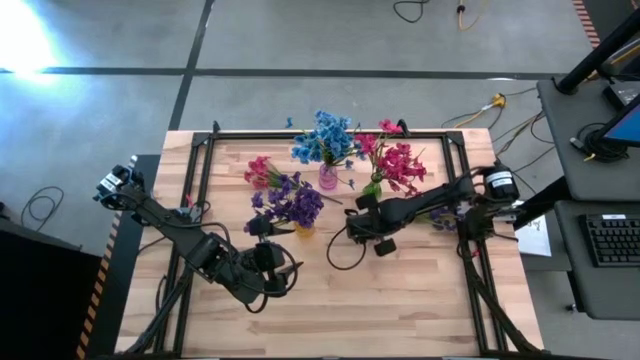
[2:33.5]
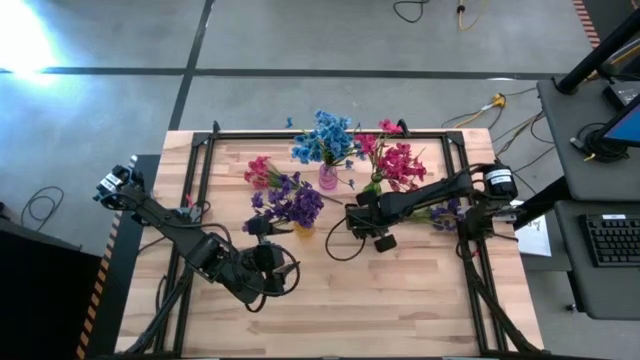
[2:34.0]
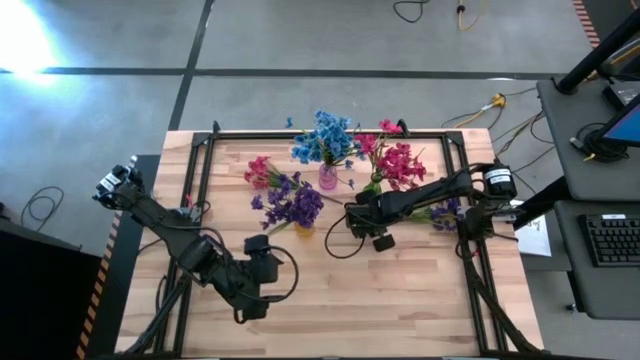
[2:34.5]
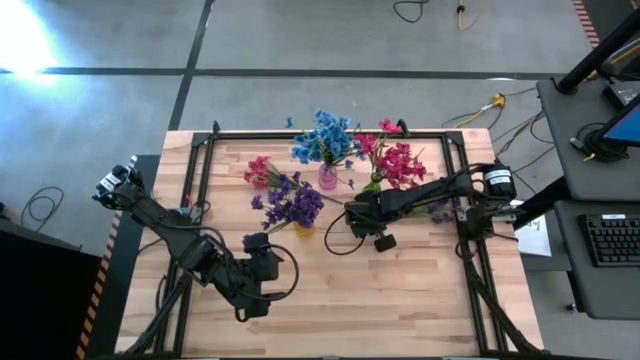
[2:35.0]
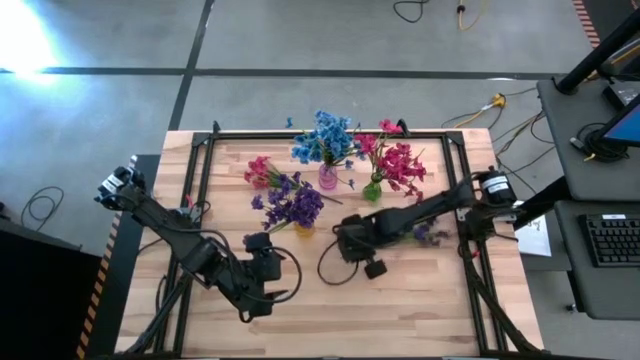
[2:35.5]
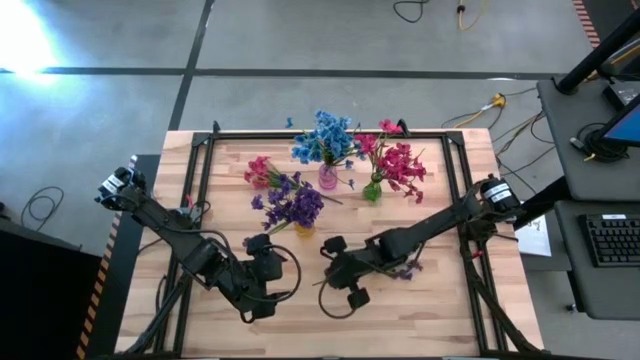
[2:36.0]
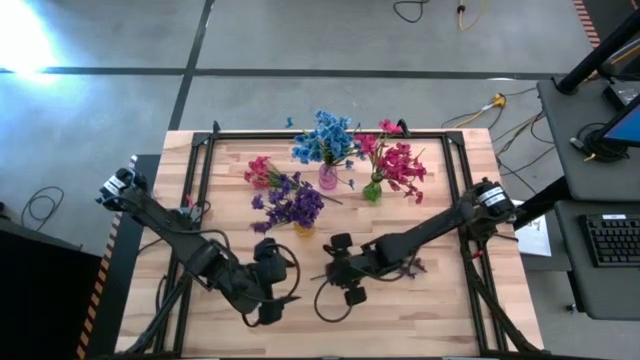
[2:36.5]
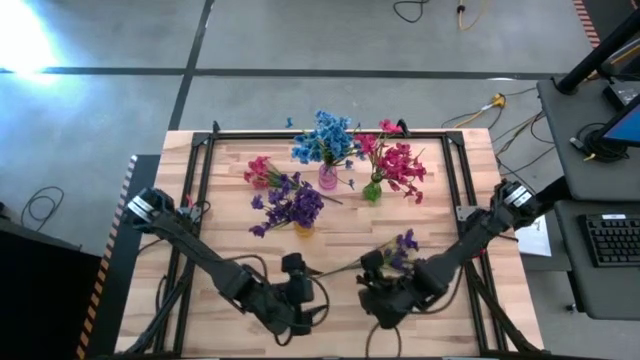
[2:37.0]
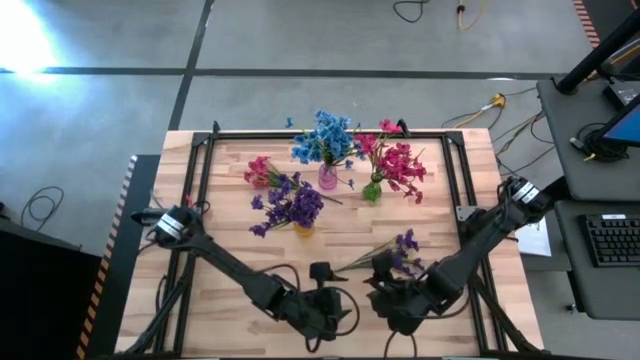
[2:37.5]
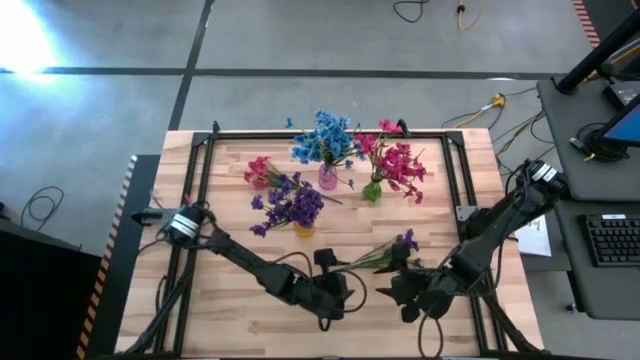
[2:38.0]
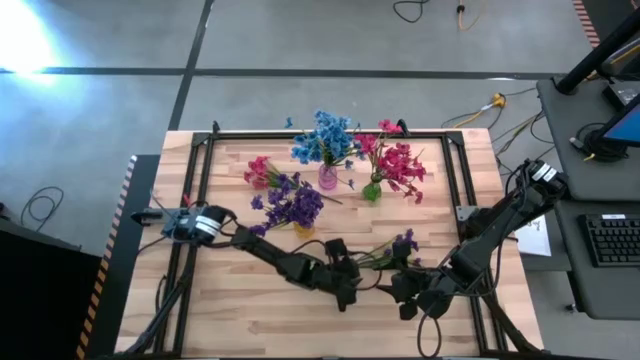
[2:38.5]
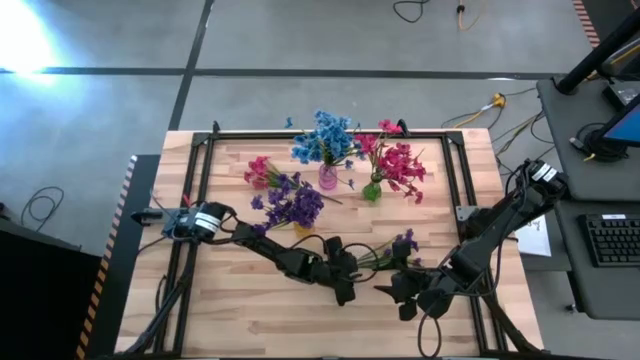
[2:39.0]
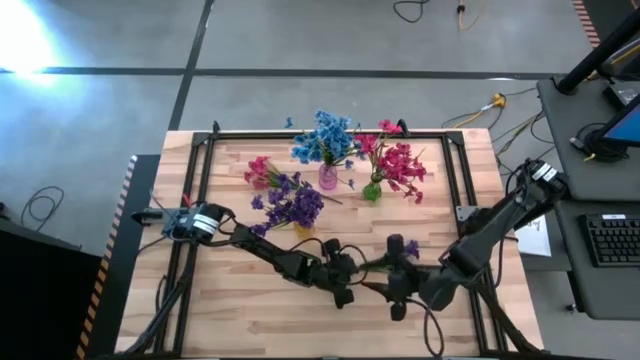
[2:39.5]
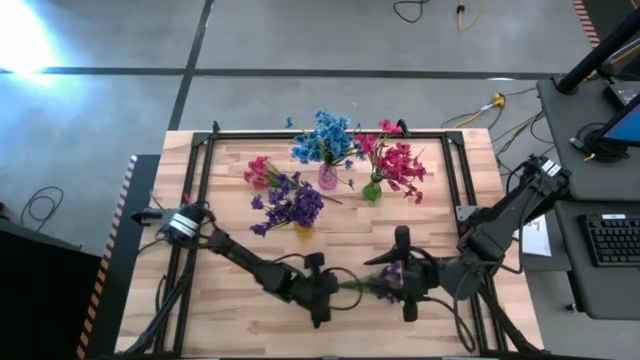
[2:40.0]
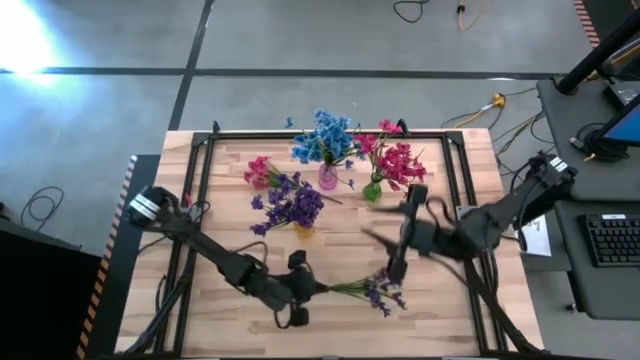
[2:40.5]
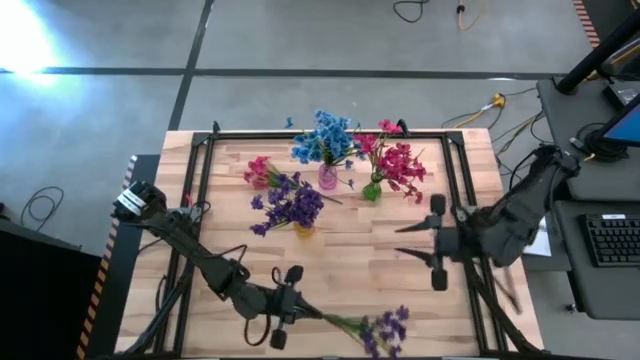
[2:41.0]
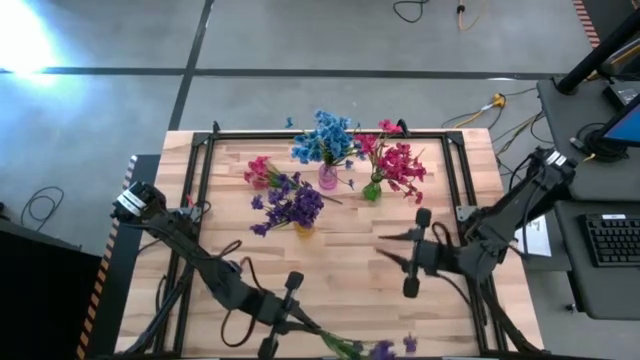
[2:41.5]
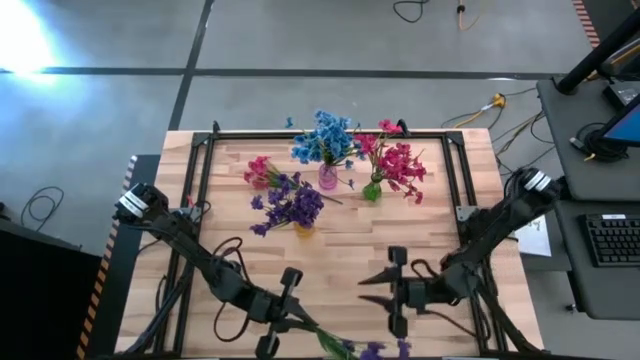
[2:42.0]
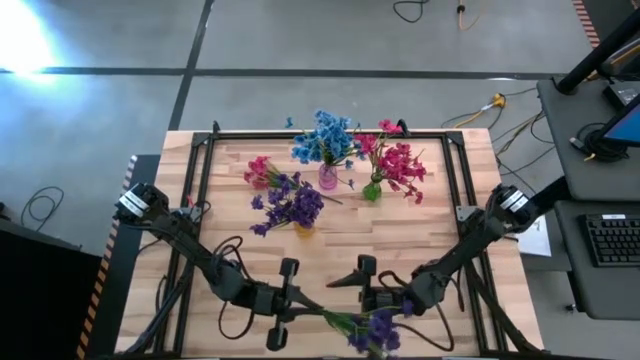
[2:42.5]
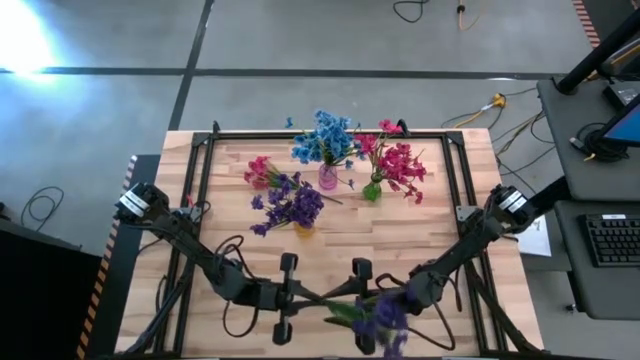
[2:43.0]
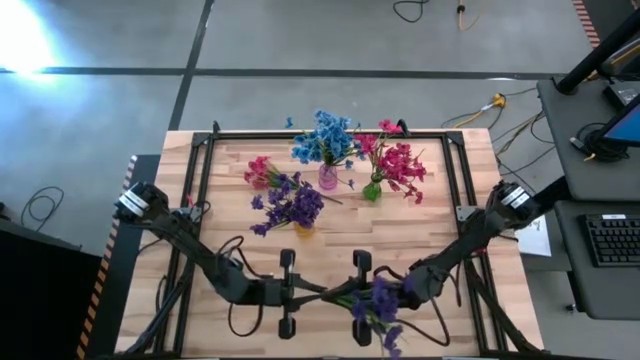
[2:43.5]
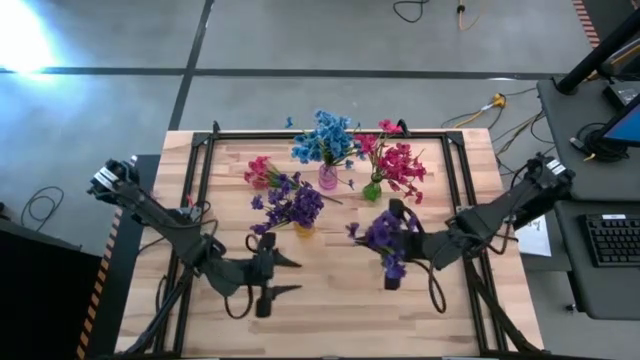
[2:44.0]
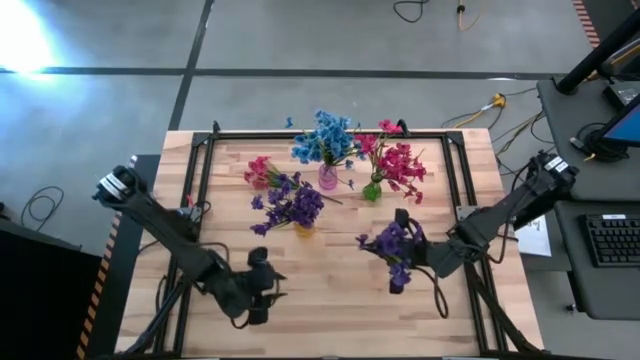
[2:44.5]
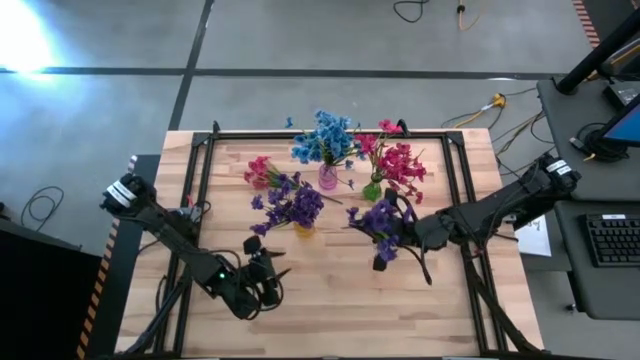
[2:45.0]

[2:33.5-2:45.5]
Task: Sort flowers into vase by color
Put the violet flowers into the yellow vase

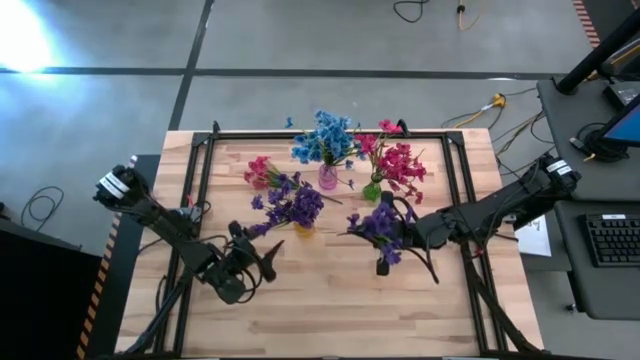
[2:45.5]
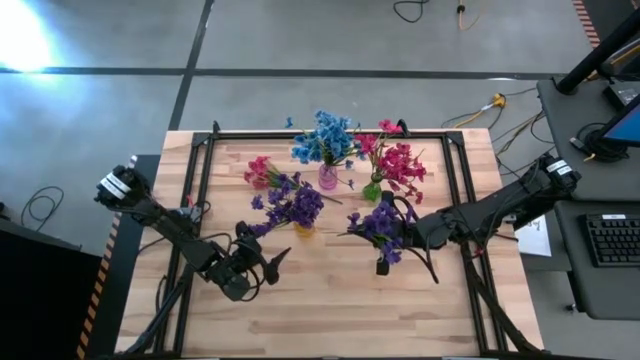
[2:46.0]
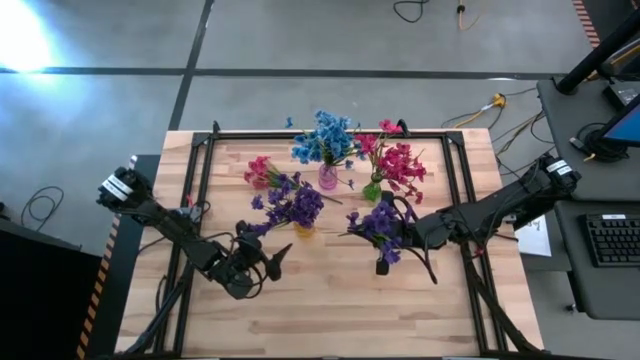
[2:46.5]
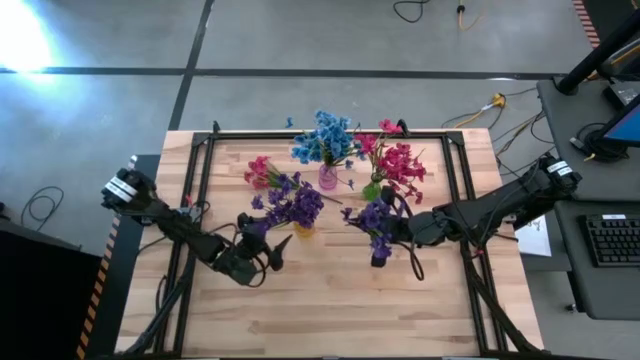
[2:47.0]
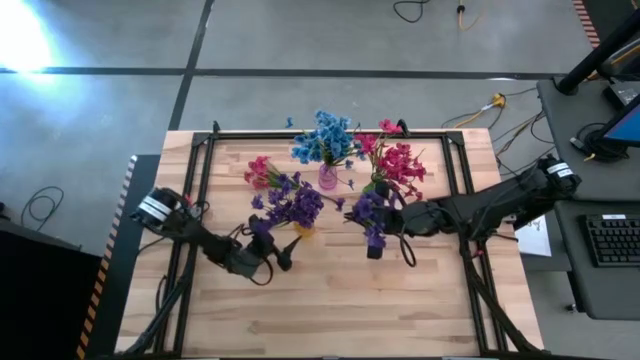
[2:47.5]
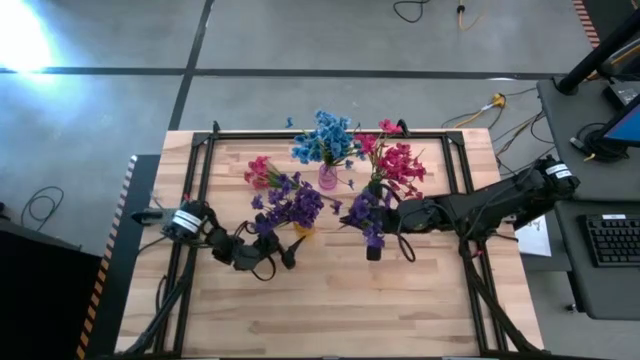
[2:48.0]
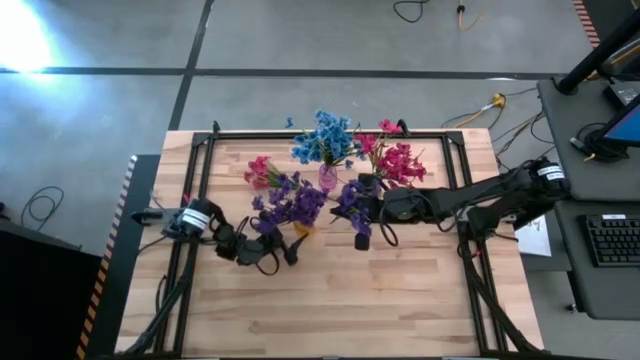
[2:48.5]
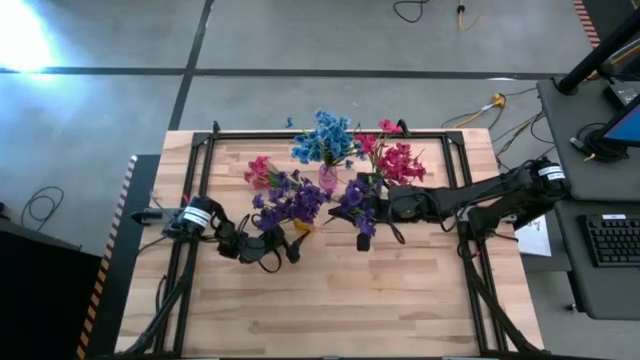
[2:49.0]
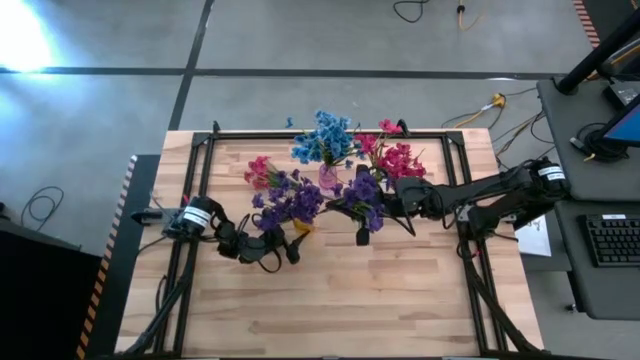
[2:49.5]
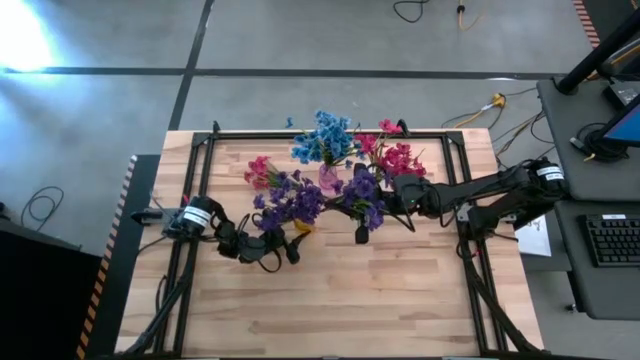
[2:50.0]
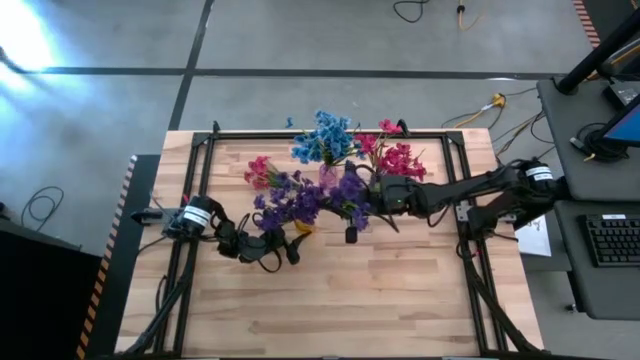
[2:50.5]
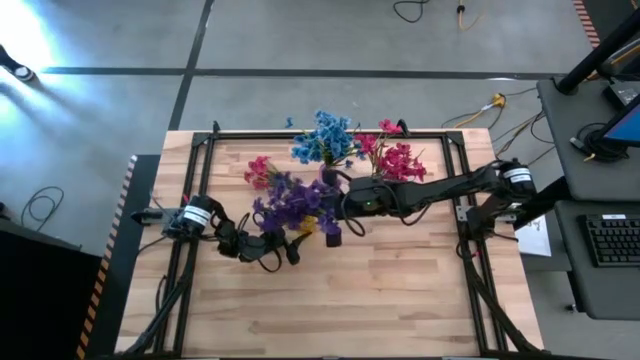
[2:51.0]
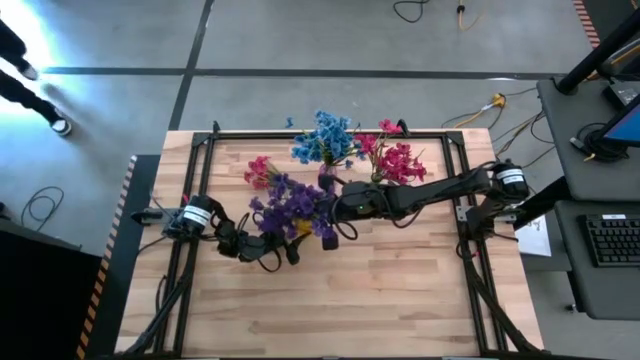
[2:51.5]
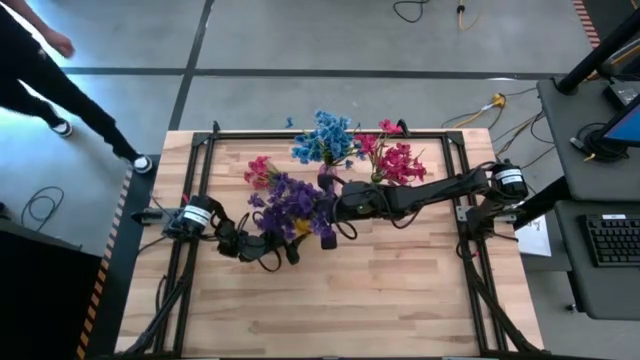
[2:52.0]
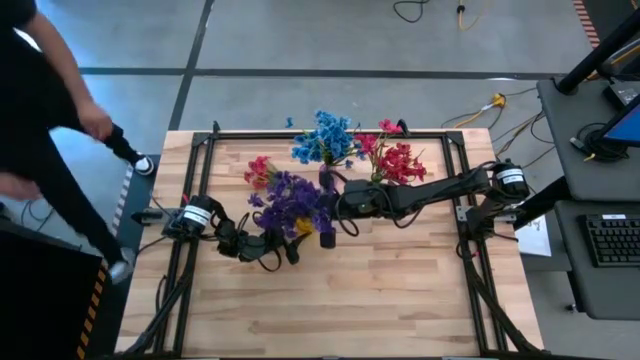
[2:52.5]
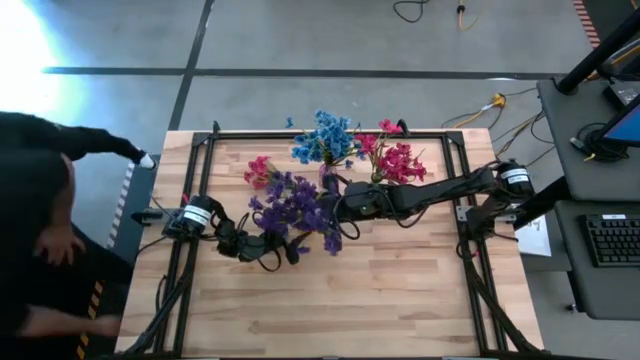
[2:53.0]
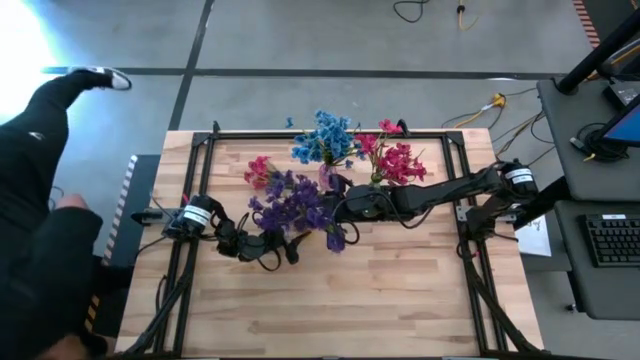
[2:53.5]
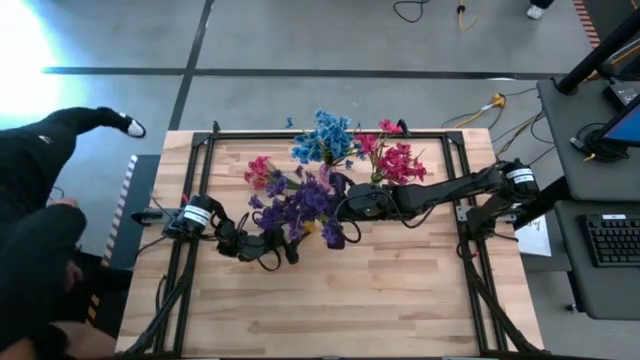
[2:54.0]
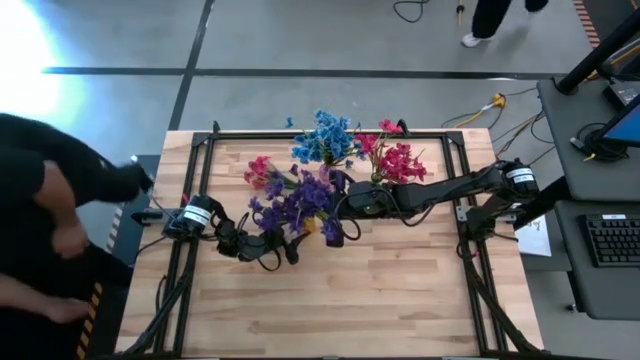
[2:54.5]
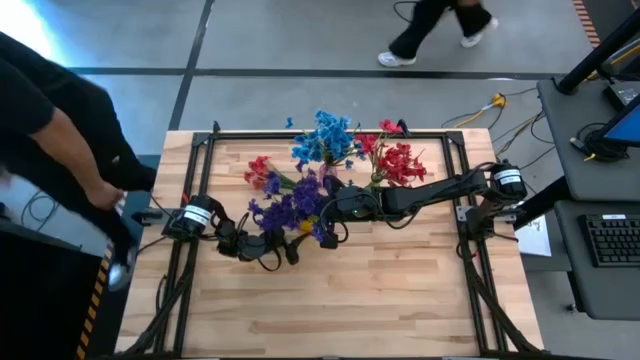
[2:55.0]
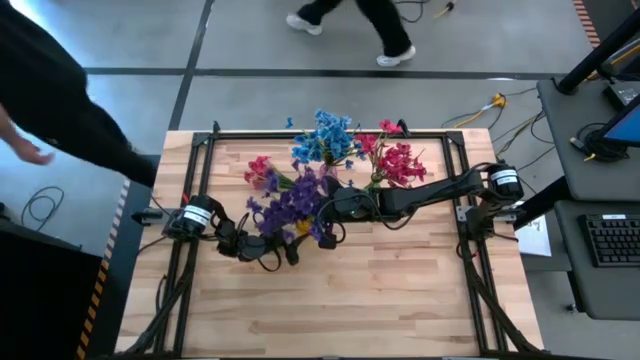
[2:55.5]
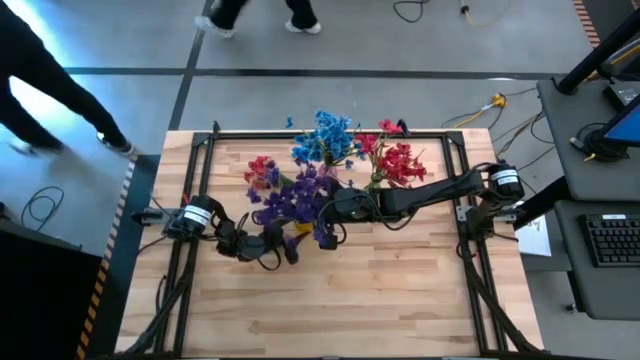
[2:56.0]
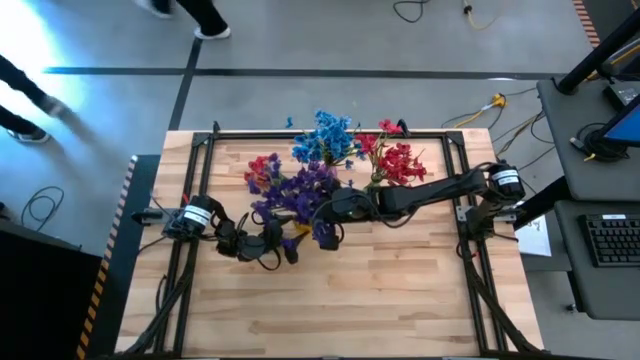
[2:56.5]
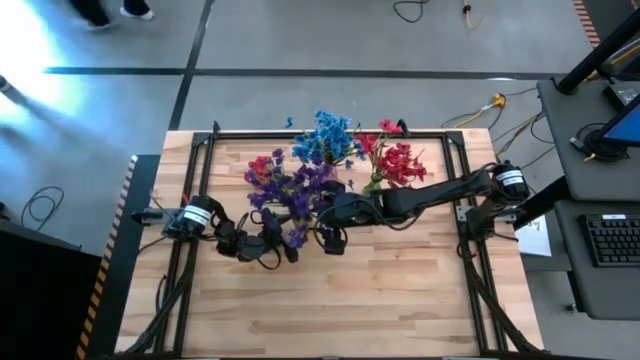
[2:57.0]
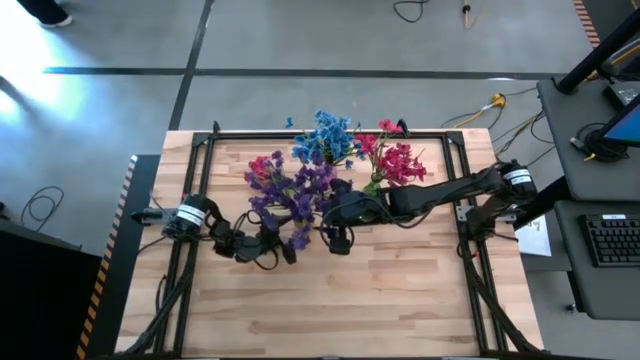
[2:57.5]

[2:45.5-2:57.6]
Put the violet flowers into the yellow vase
